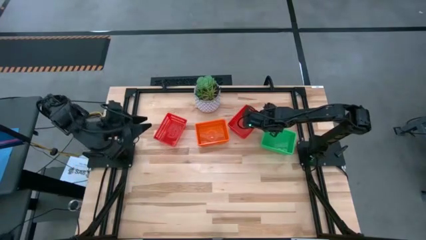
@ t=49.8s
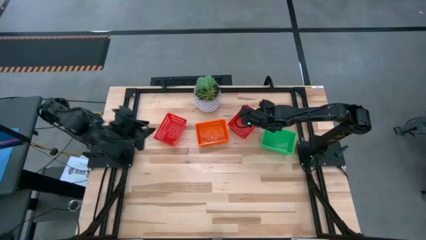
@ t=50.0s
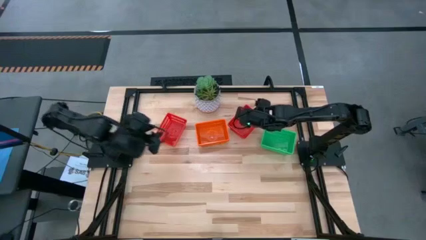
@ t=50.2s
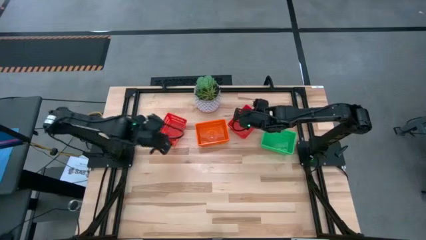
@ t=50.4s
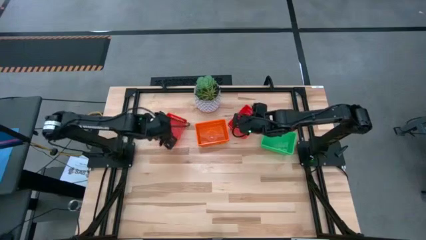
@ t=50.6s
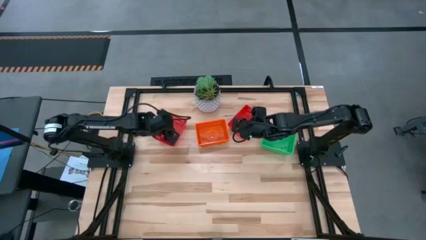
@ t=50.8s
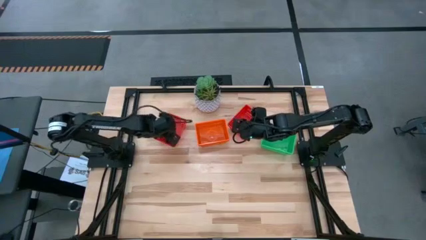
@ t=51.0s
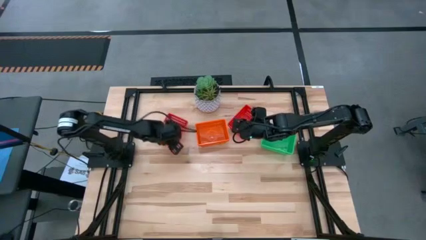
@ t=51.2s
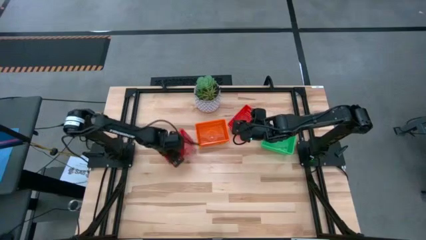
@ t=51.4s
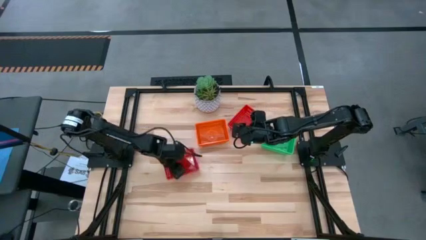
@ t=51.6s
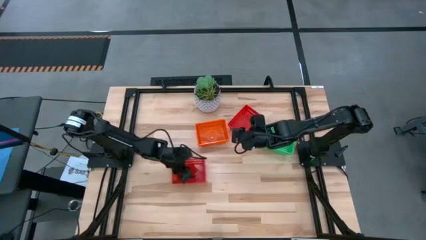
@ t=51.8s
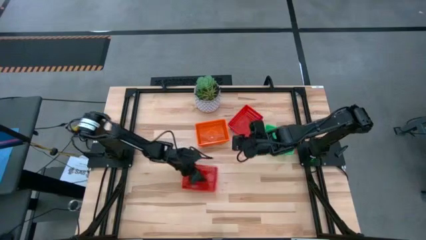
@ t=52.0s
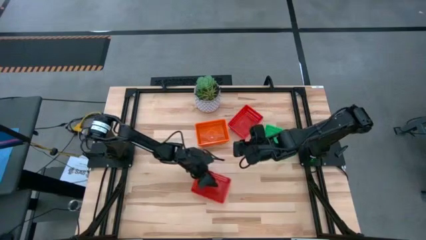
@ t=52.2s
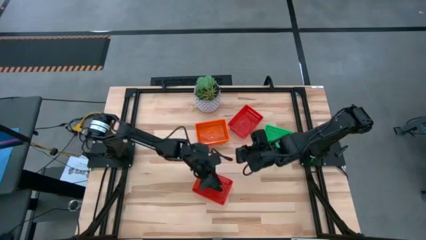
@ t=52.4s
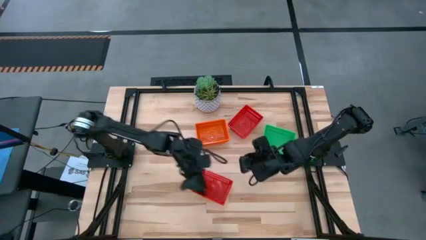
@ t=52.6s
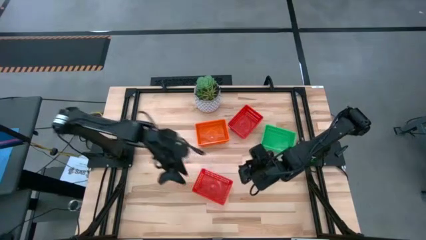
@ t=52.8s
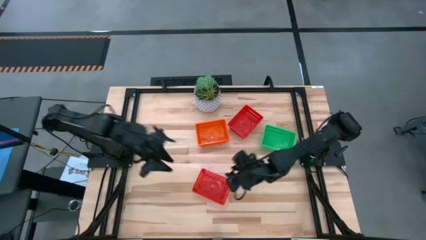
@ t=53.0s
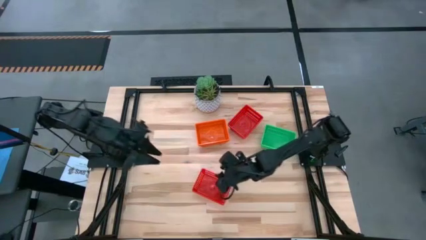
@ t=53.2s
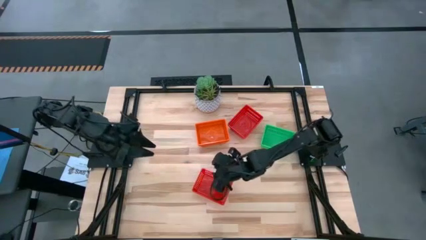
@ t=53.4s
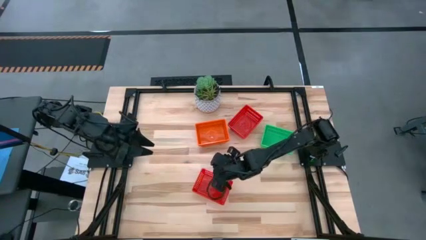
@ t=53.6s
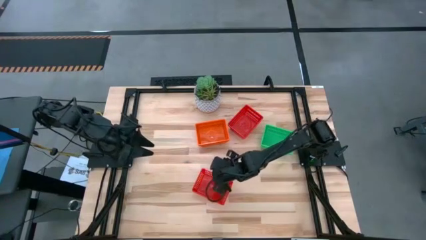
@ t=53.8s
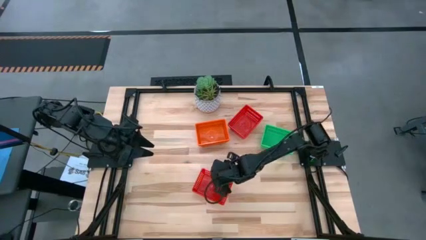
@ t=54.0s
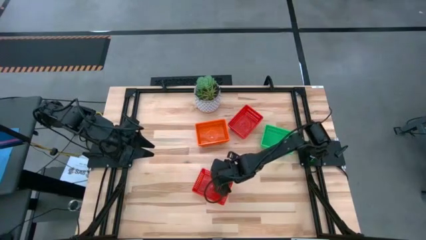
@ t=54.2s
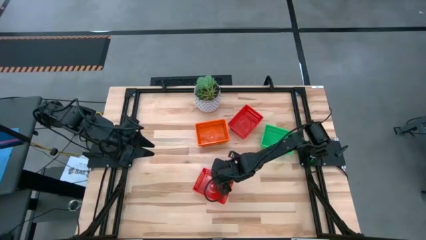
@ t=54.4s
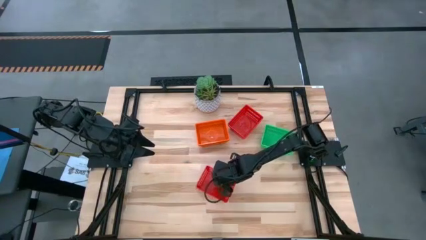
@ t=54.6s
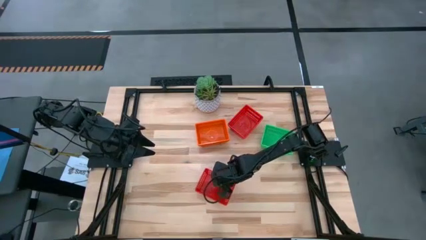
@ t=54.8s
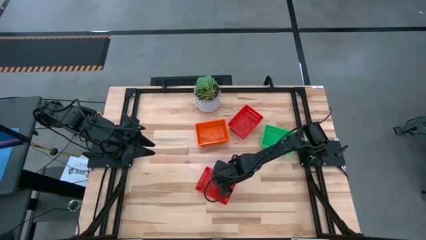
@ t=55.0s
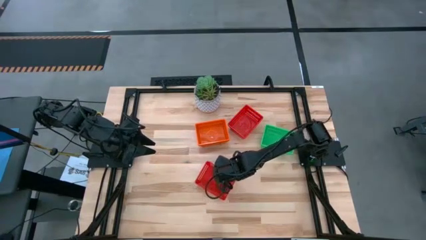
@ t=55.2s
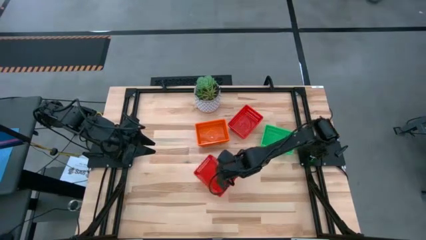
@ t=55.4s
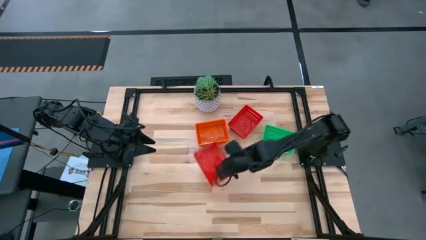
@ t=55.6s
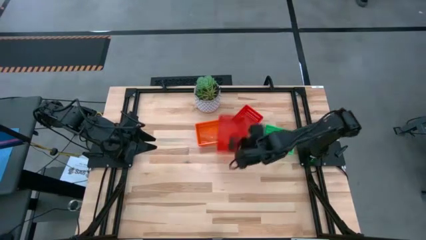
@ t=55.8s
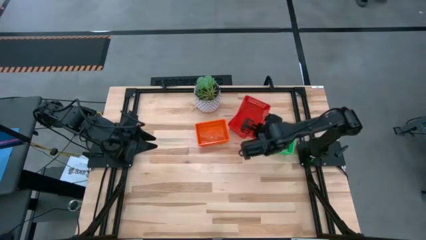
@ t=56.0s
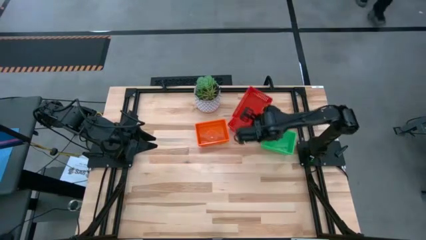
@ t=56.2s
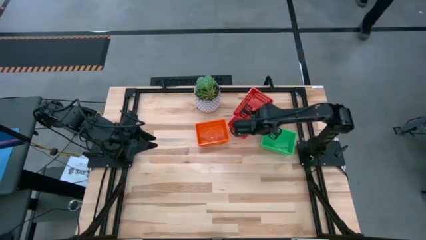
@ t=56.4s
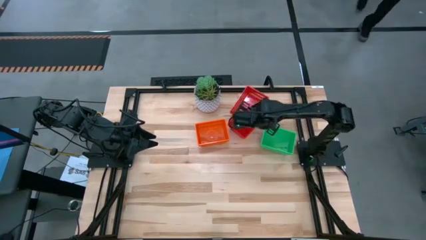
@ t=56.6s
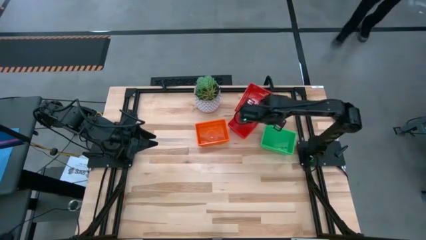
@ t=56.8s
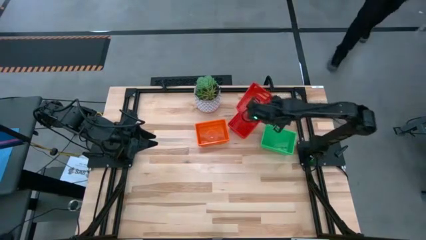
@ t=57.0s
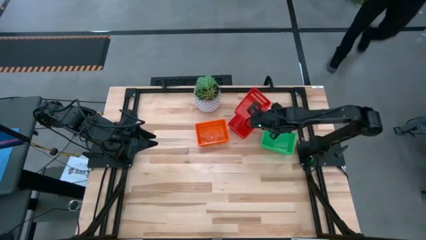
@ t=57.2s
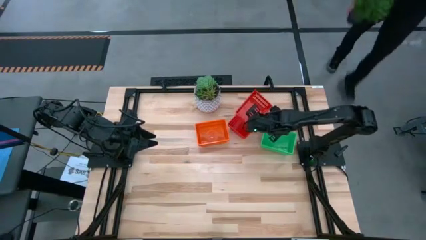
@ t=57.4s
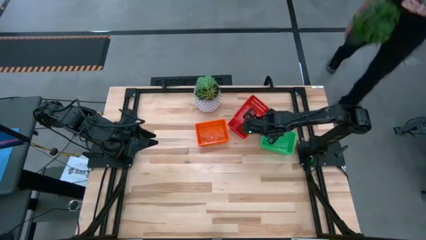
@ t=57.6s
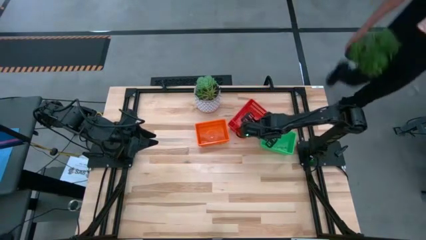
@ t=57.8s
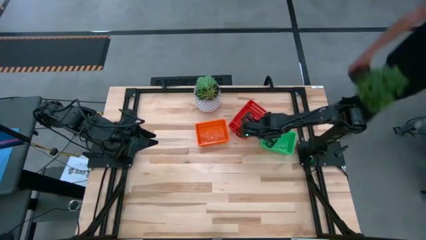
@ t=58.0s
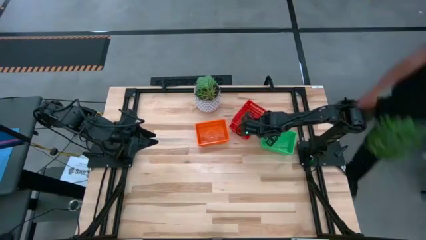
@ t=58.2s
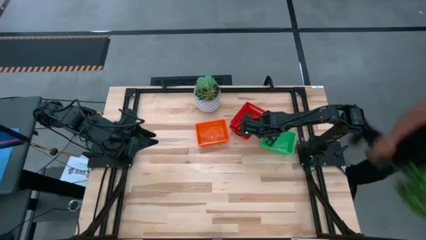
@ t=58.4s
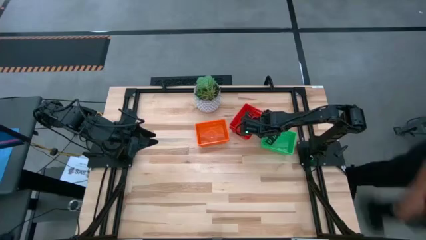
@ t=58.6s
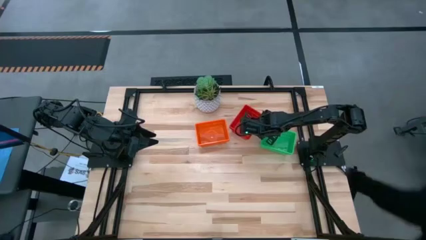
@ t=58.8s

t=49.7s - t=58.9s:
Stack the bottom red bin into the stacked red bin

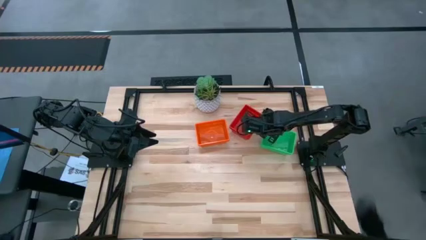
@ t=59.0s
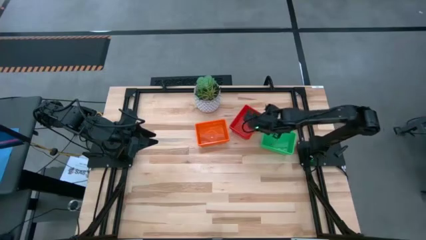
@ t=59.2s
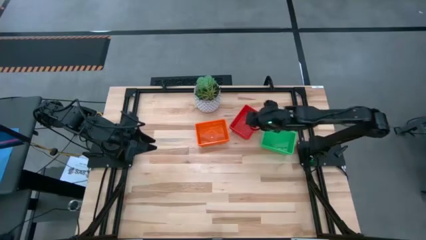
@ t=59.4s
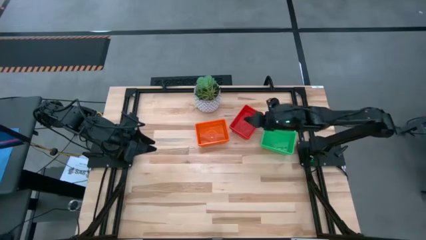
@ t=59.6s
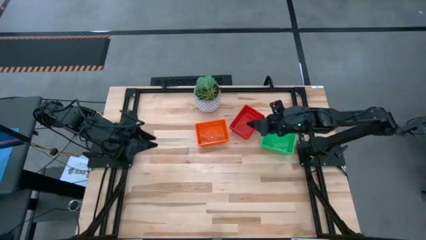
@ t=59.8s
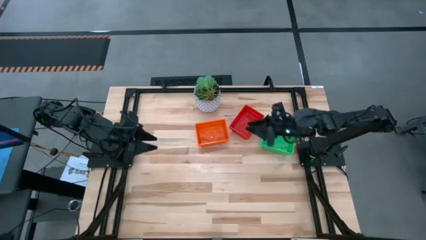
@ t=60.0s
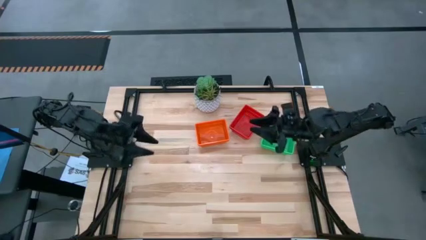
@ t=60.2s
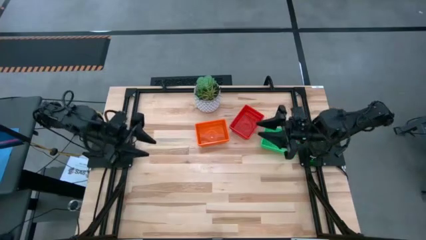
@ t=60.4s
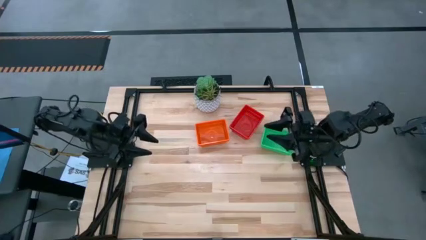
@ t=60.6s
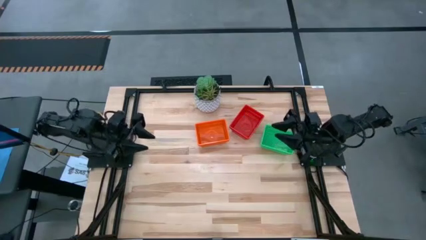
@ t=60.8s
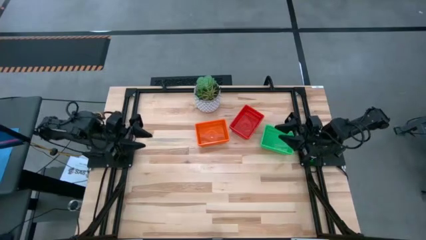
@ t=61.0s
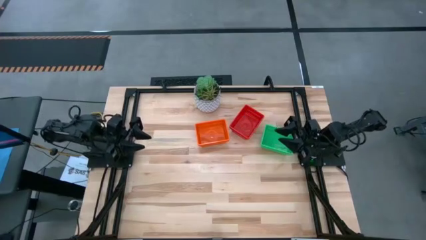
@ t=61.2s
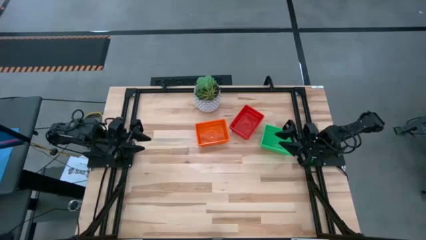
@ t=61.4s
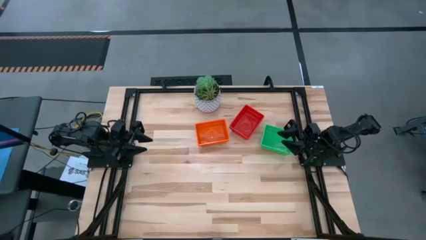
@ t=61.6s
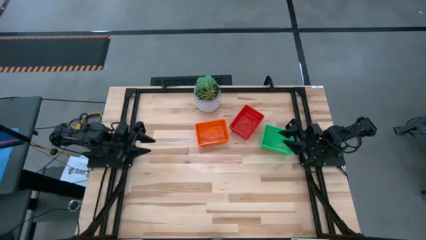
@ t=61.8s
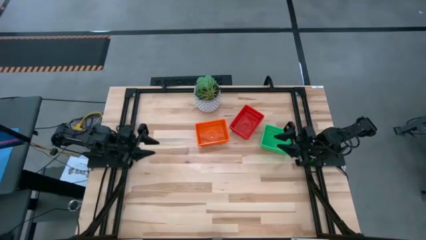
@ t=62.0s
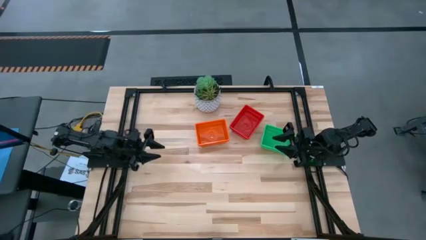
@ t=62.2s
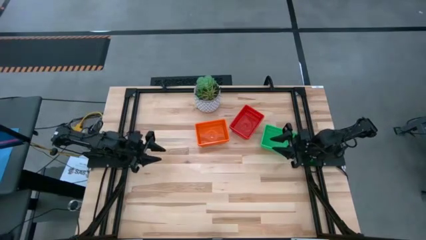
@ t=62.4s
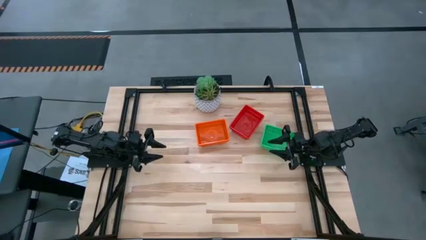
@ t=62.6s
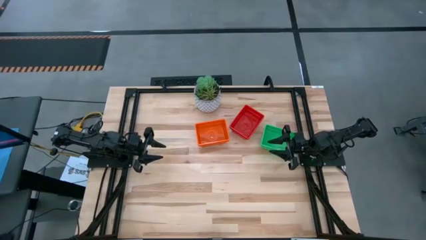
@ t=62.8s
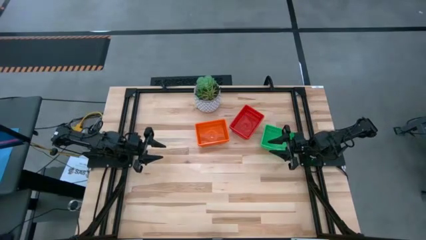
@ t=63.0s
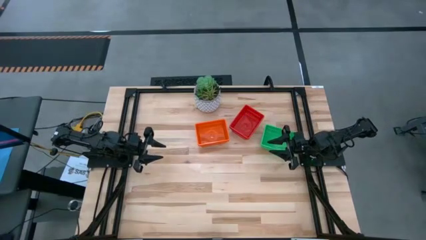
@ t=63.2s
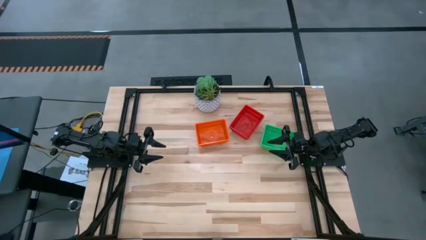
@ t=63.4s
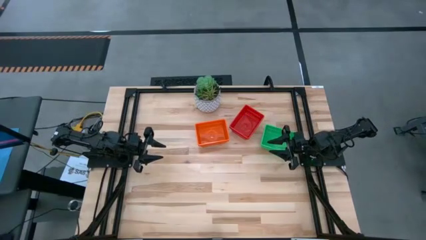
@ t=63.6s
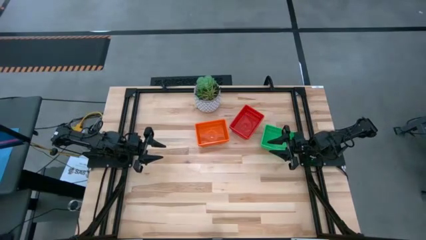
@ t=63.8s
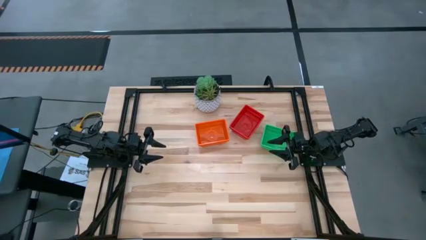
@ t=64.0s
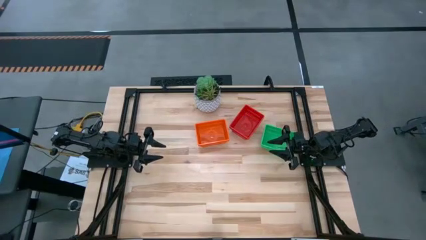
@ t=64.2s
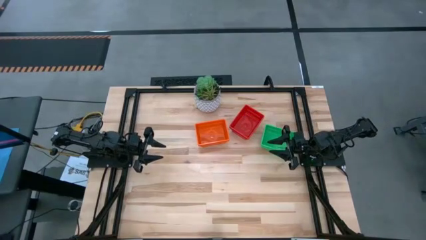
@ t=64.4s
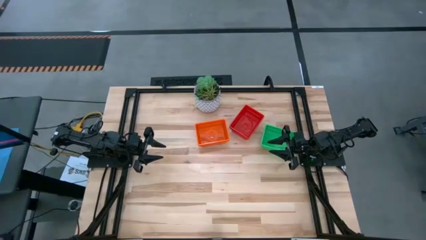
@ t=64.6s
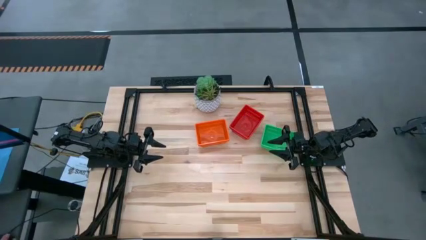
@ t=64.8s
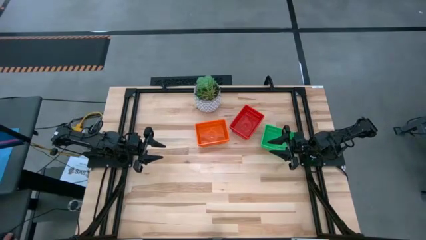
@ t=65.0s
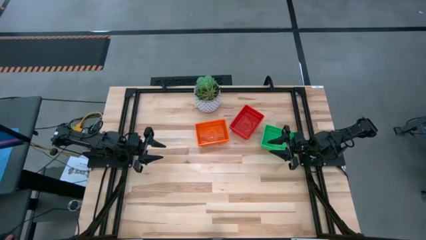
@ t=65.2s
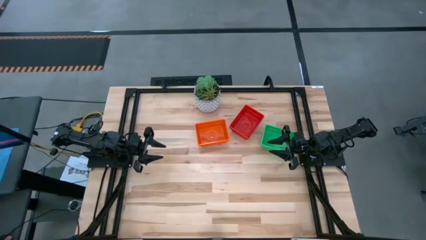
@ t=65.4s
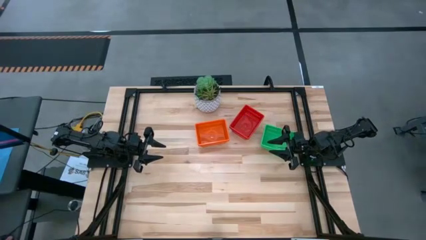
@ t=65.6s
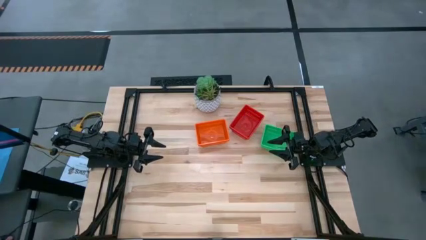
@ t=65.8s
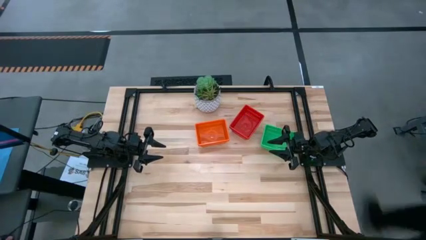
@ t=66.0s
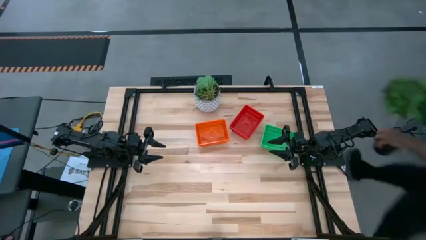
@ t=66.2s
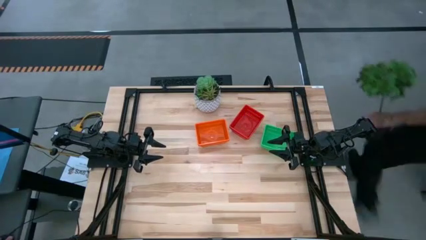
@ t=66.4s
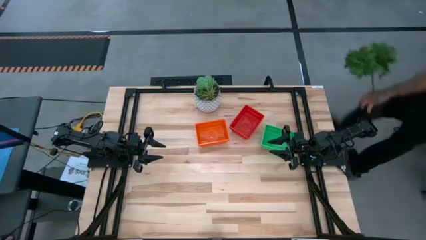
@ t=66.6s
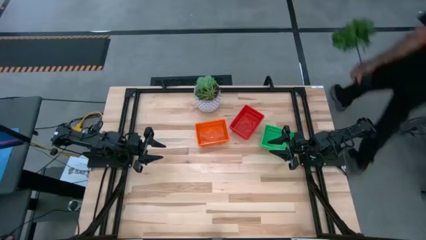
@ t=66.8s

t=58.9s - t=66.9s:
Return to Home Position
